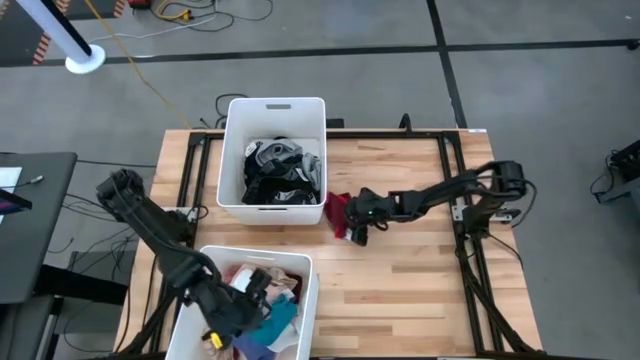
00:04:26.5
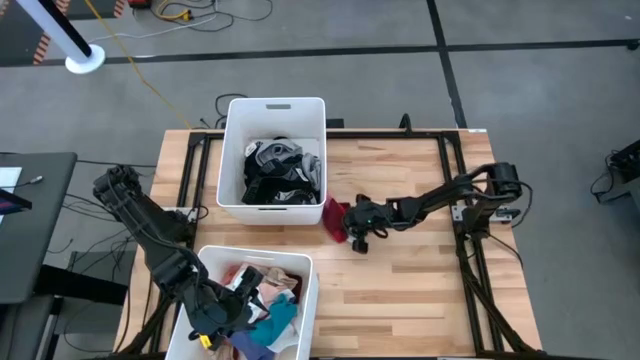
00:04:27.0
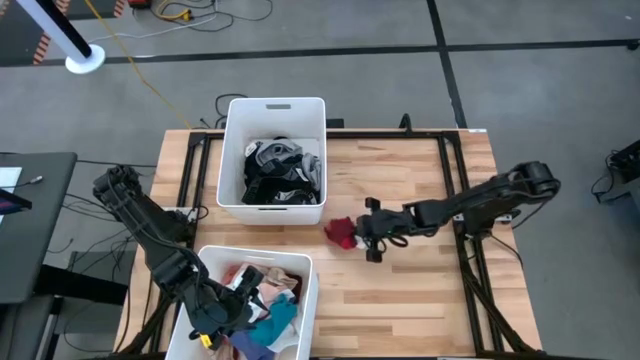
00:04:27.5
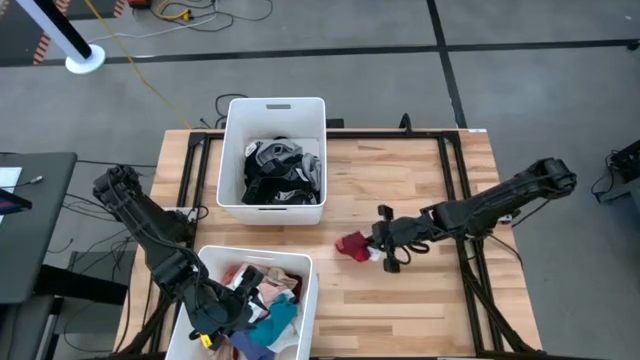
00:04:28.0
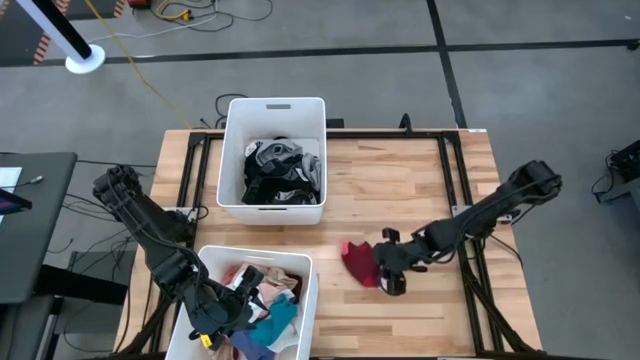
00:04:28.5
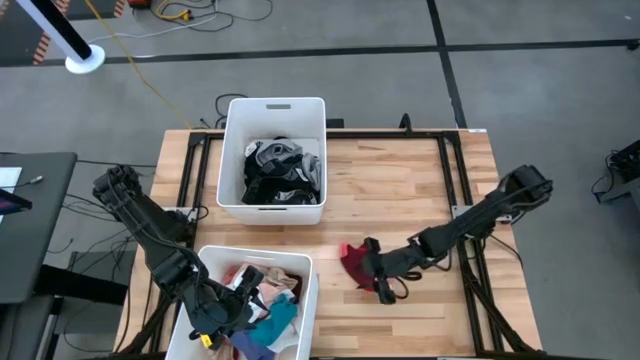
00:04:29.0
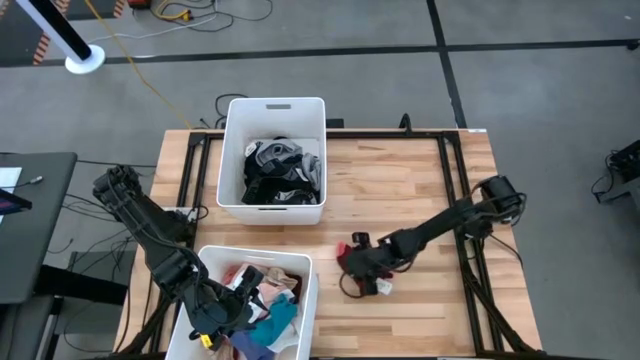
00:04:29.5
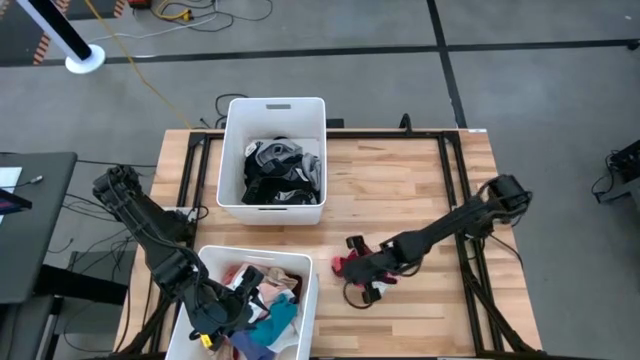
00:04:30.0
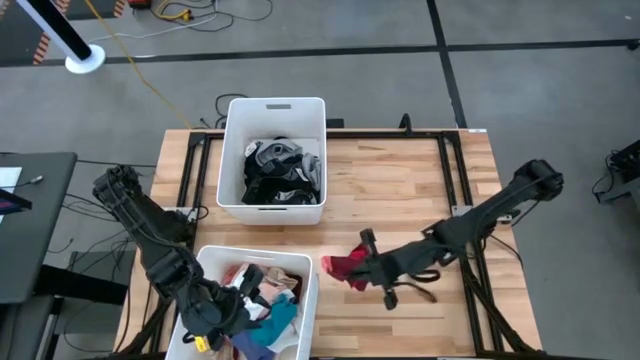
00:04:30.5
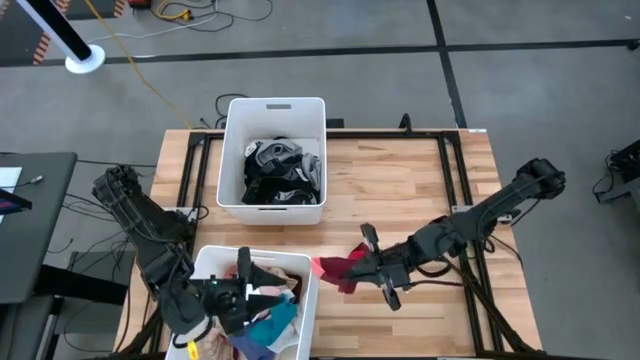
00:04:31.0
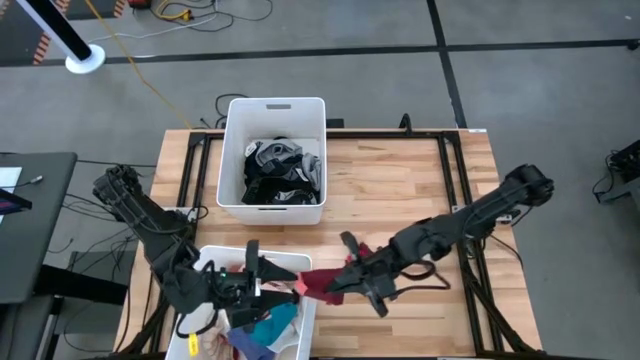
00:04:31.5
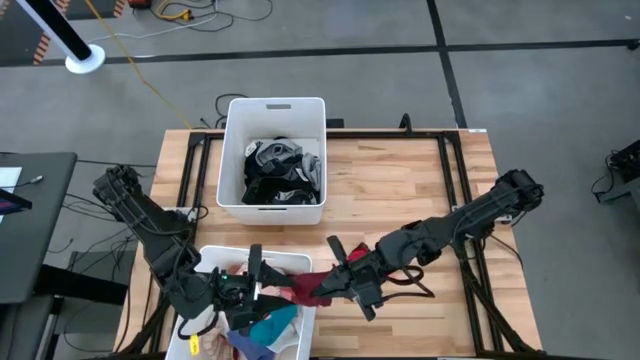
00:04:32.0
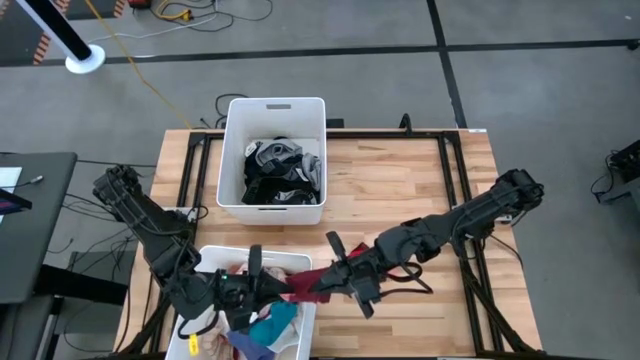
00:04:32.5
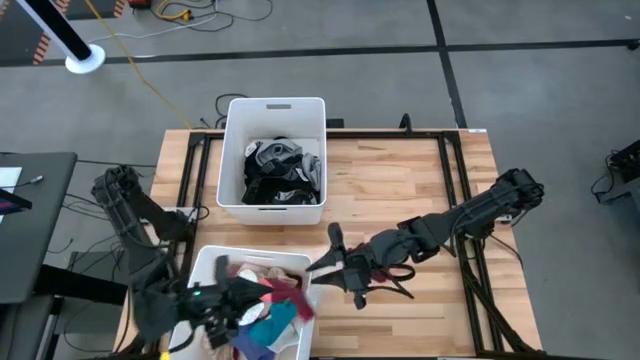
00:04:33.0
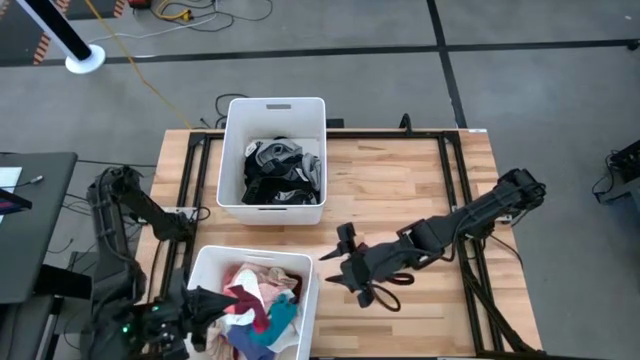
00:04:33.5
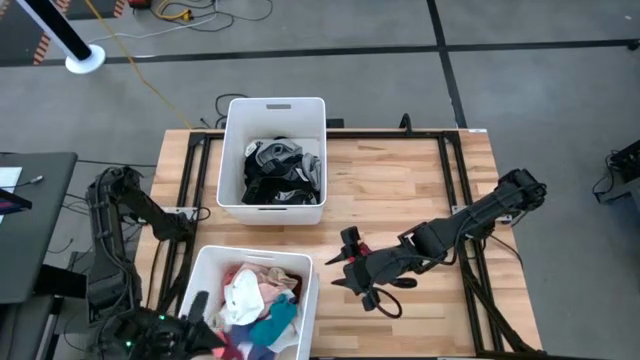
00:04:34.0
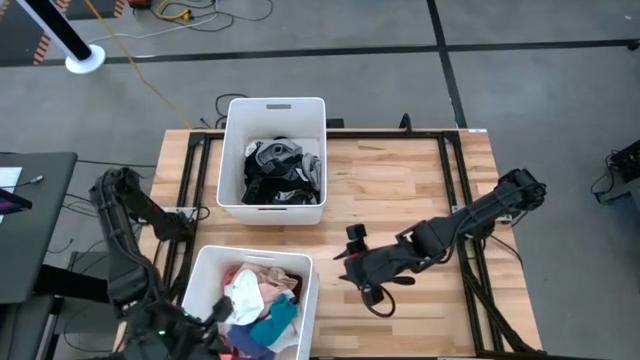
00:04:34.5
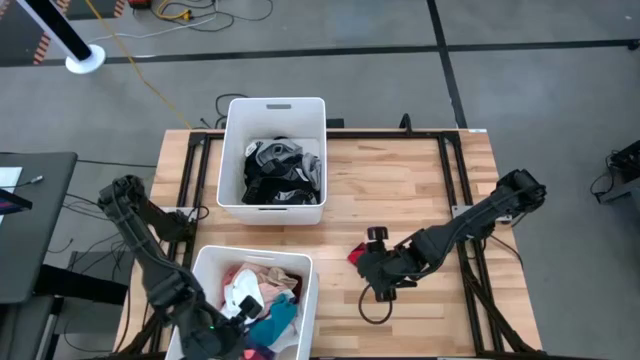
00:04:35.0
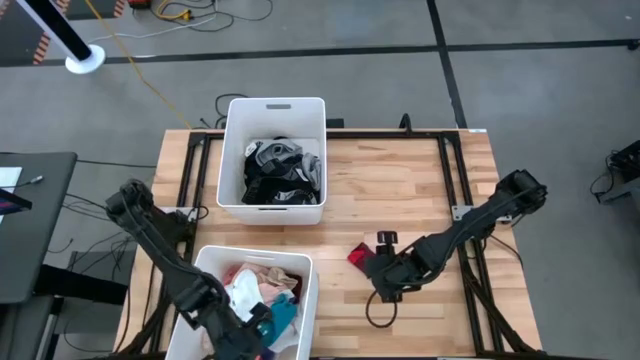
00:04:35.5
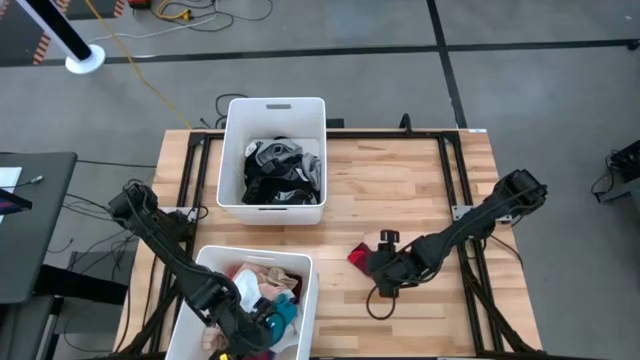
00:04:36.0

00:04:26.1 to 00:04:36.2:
Task: Sort clothes
Put the red sock into the bottom white laundry bin

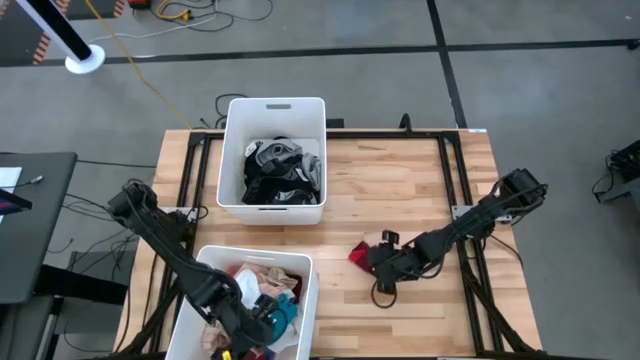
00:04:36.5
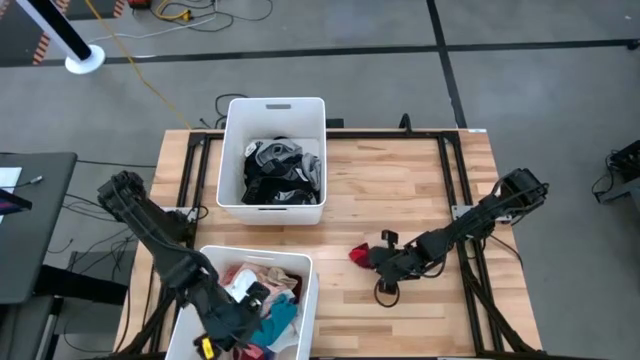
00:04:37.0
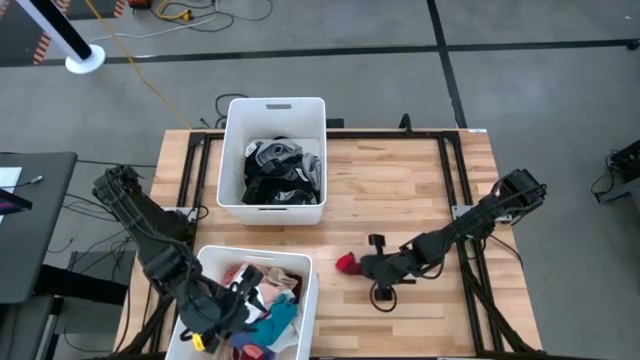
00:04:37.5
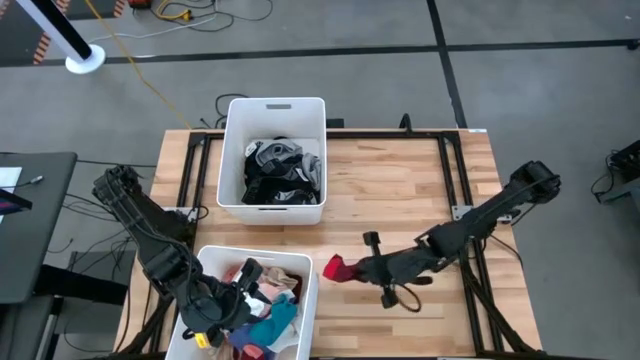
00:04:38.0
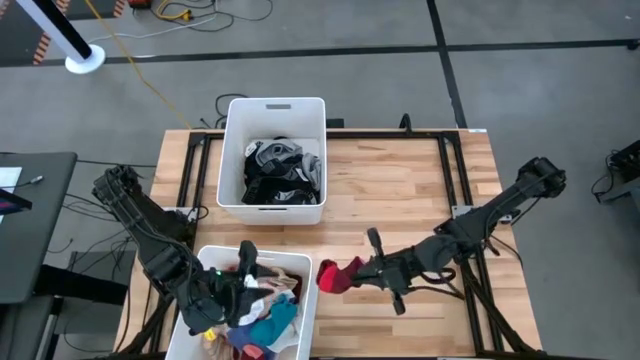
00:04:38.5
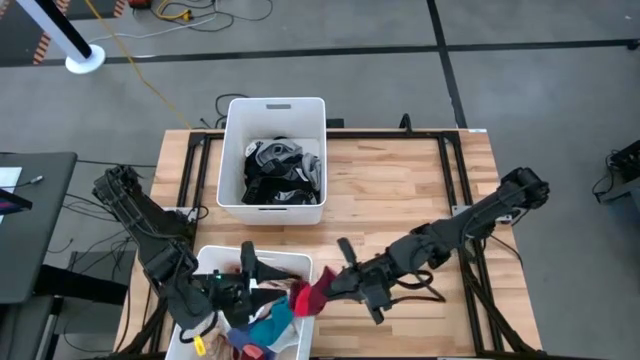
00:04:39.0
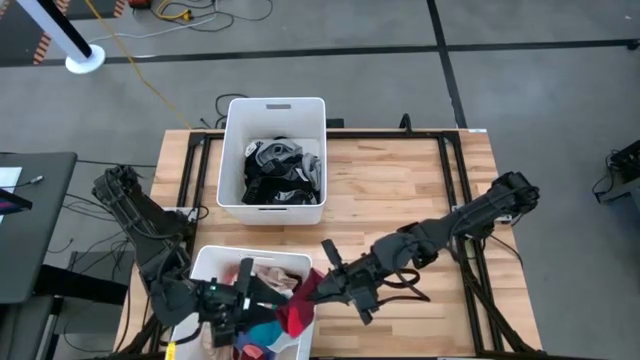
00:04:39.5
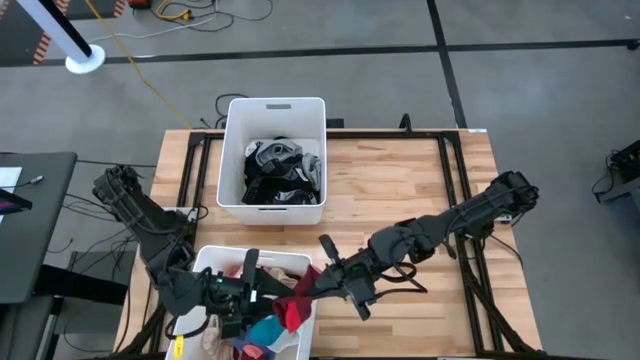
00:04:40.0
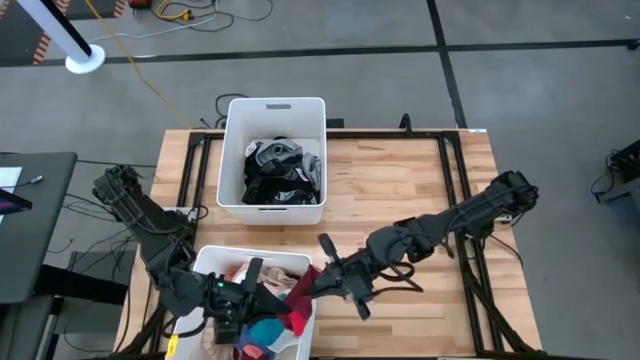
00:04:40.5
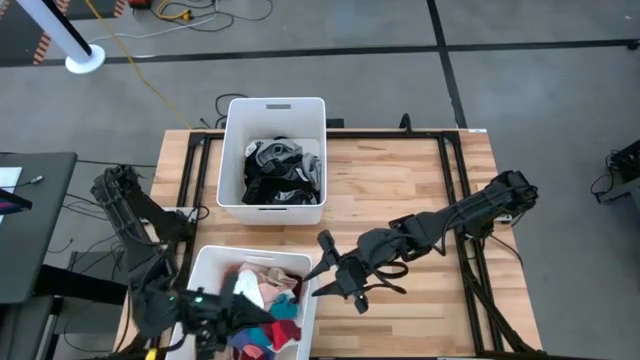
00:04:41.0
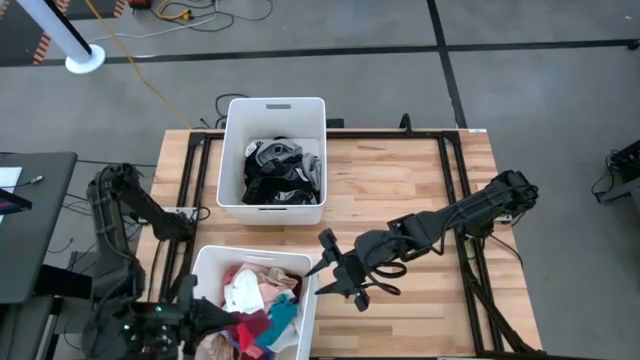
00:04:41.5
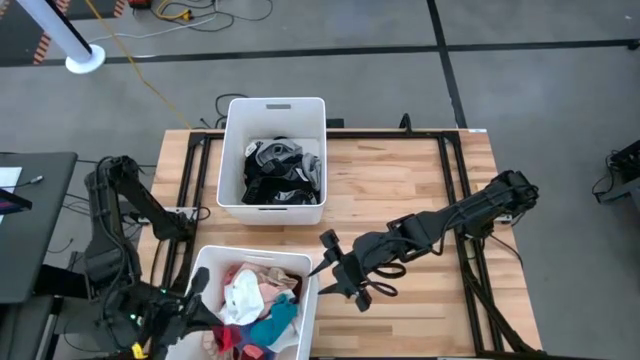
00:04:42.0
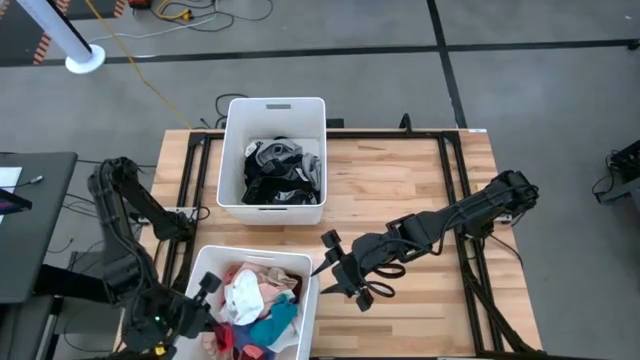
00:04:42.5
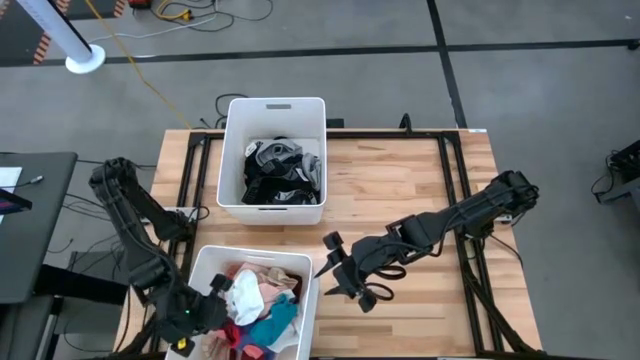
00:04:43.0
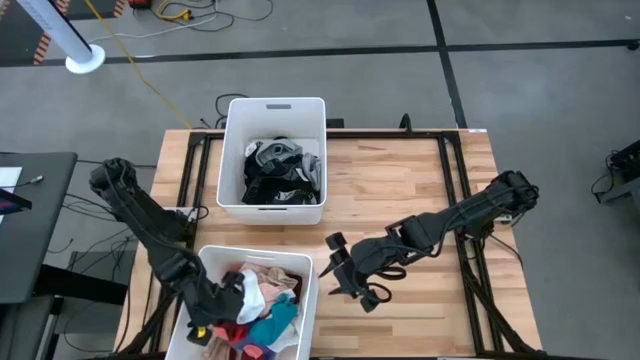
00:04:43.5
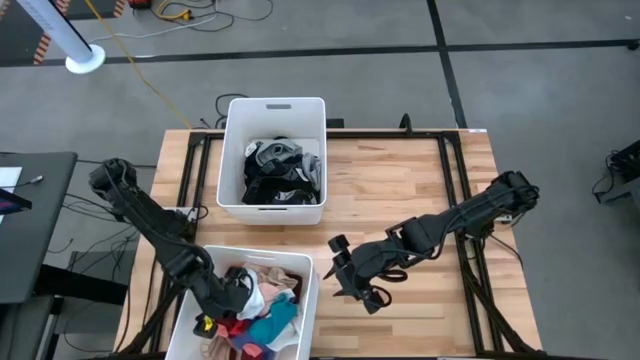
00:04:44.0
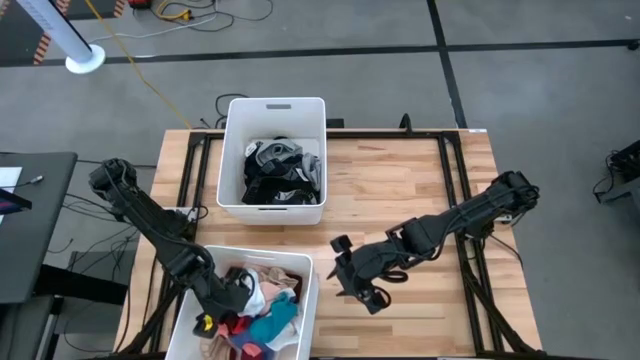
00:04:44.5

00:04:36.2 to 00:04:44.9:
Put the red sock into the bottom white laundry bin
